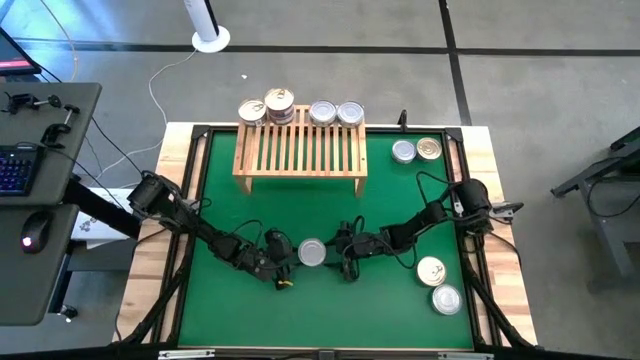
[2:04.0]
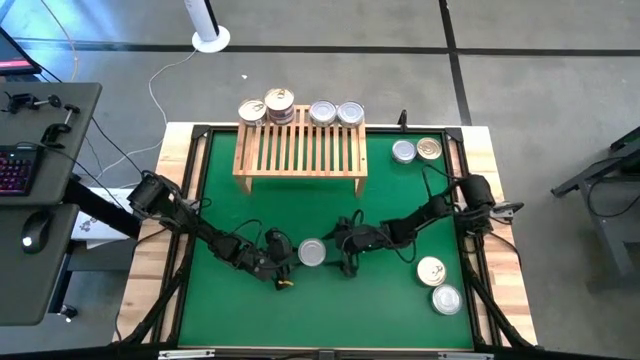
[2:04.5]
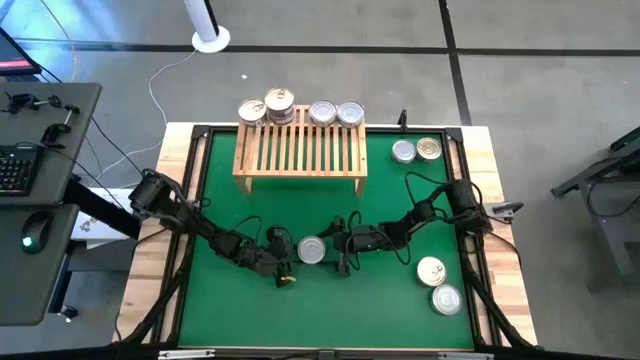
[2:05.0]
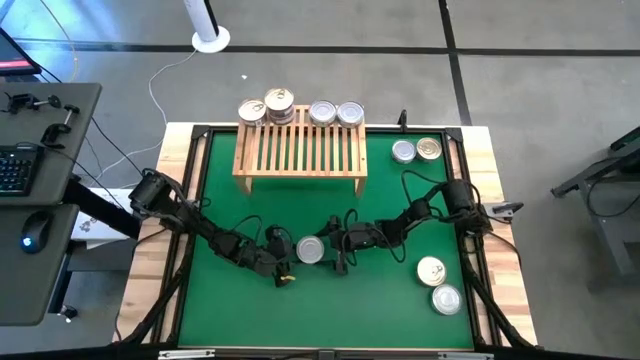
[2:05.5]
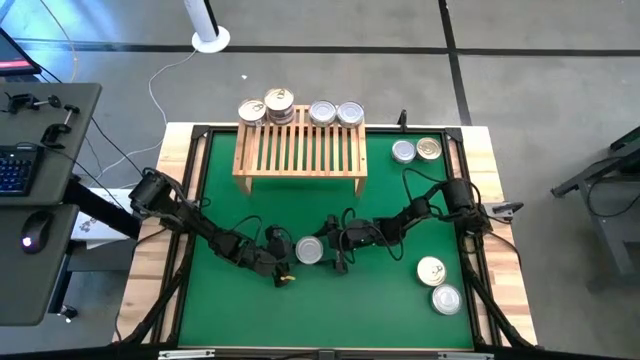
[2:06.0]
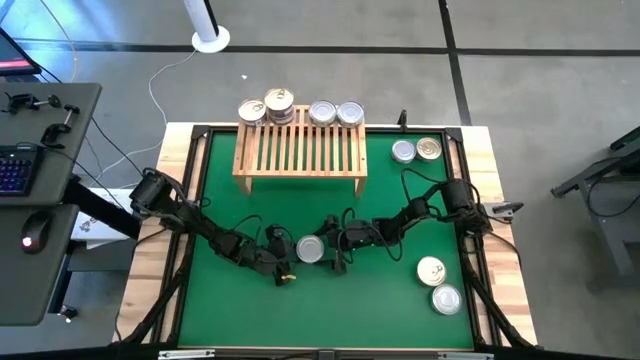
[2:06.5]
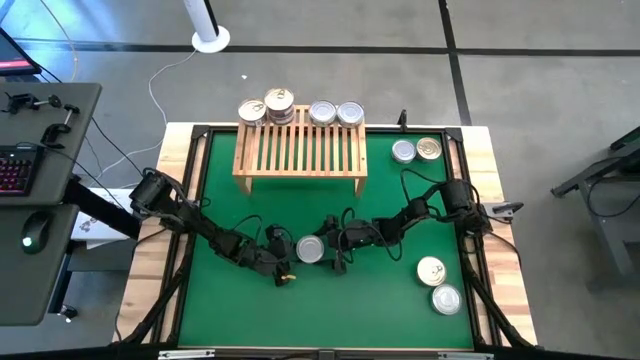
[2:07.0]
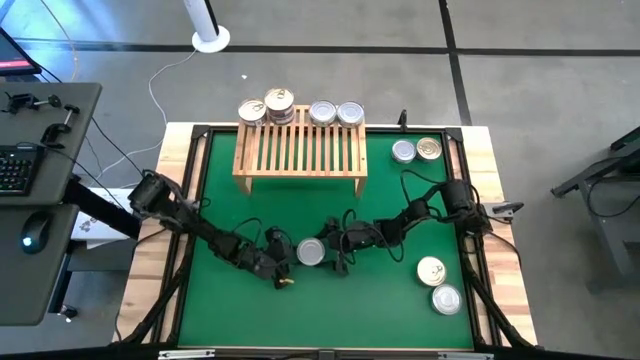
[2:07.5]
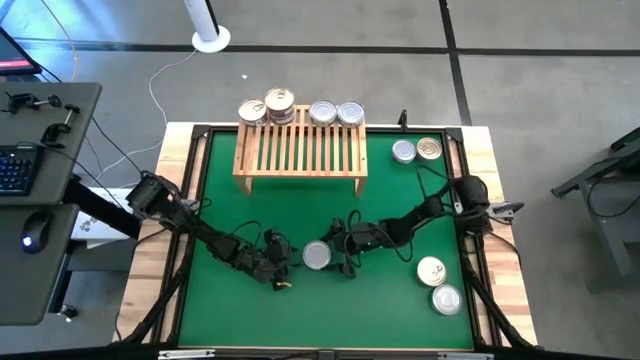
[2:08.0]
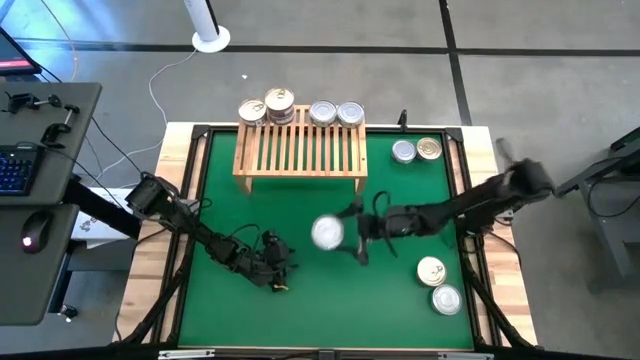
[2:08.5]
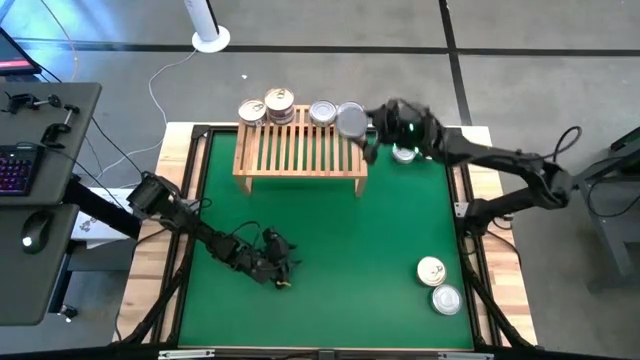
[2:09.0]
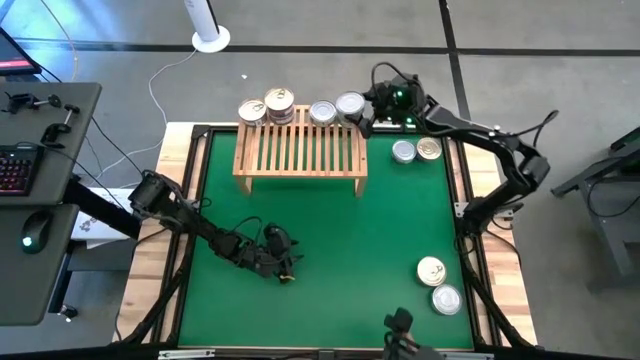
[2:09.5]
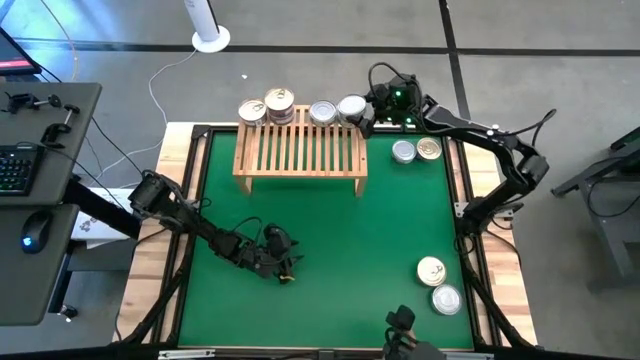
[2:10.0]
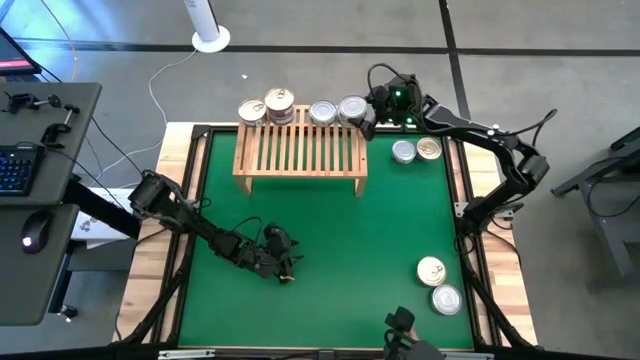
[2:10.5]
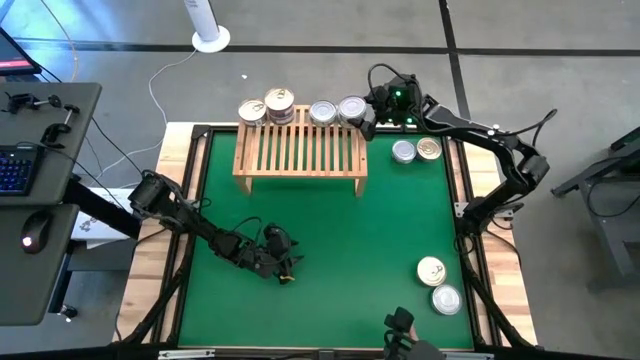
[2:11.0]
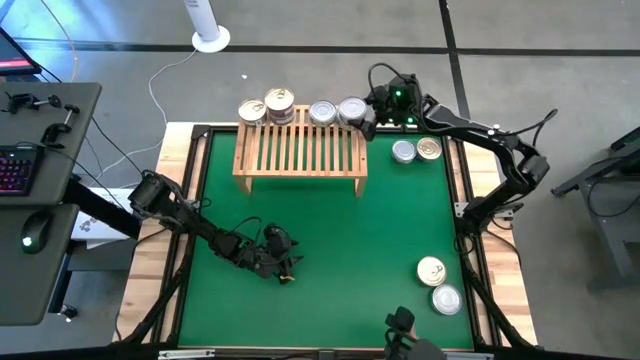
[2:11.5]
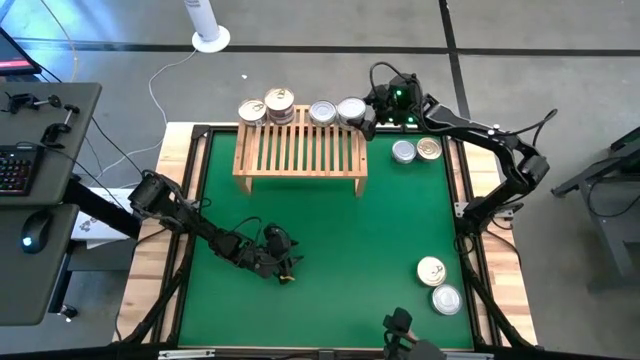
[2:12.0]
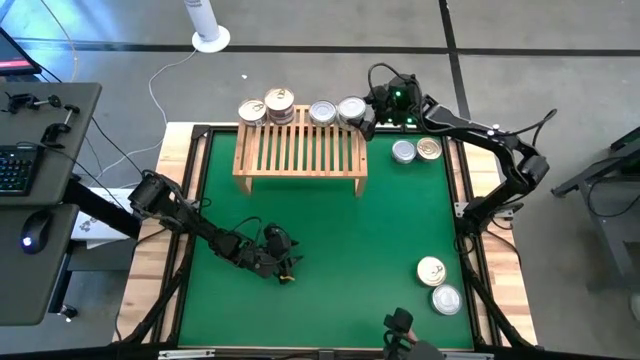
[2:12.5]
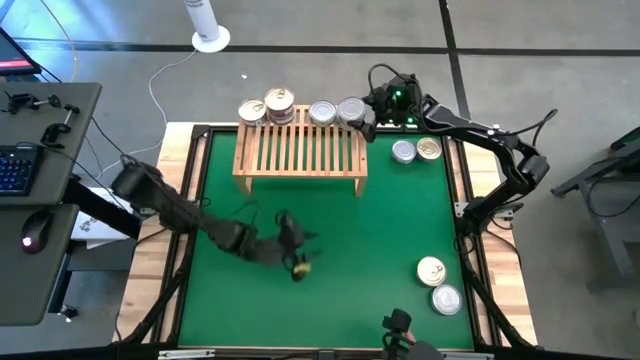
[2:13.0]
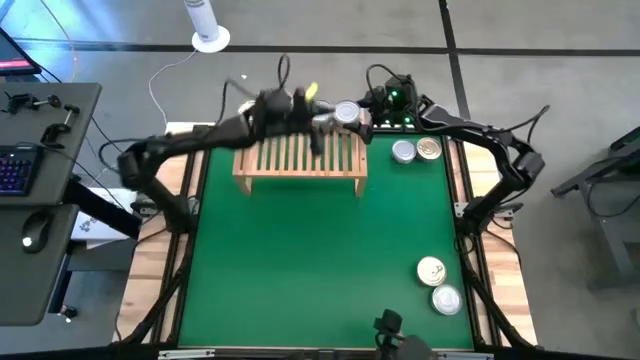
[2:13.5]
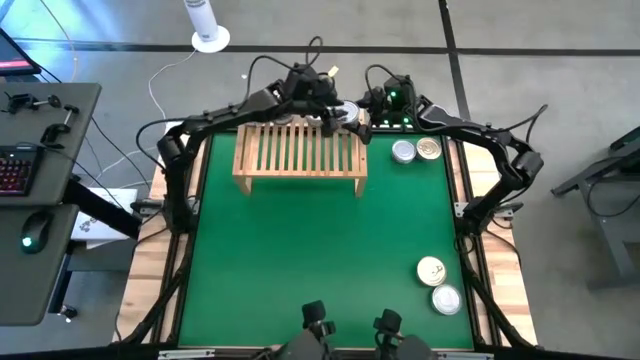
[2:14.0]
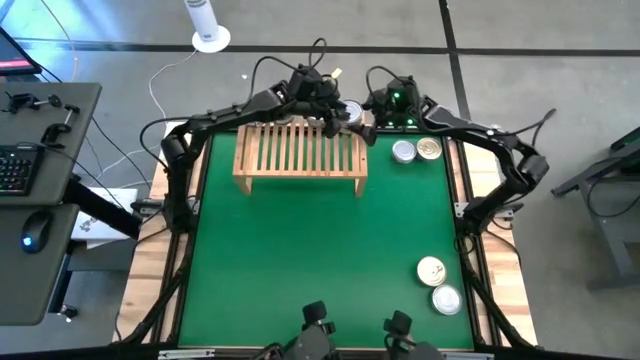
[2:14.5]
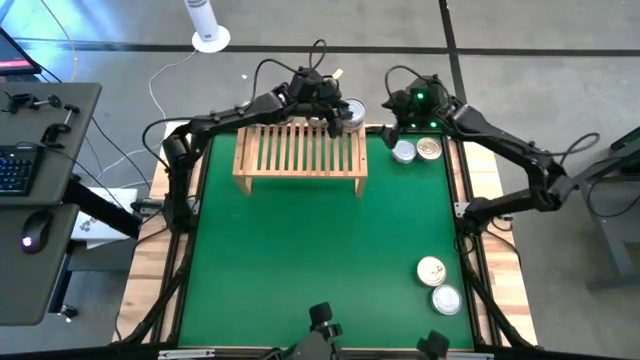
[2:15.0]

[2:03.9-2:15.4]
Task: Stack canned seafood by type on shelf
Stack the green white tuna can on top of the right green white tuna can on the shelf

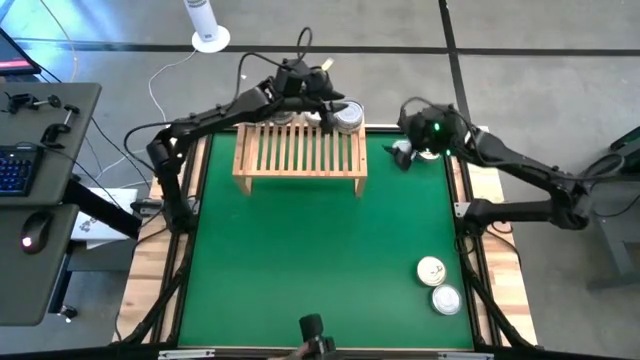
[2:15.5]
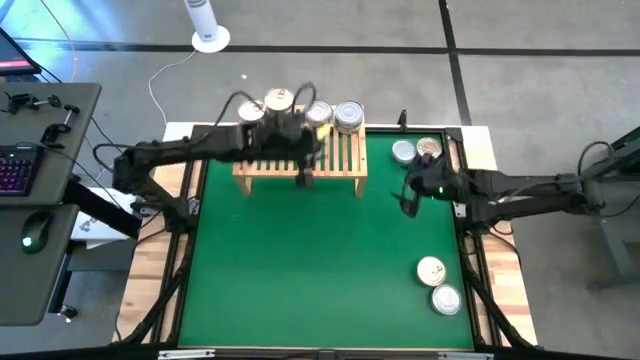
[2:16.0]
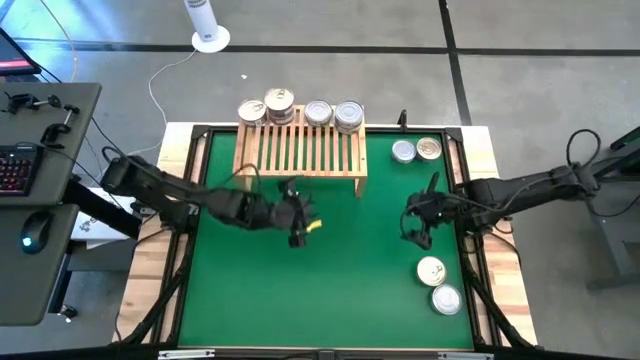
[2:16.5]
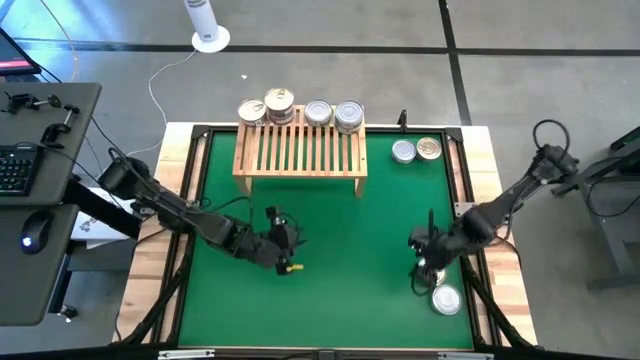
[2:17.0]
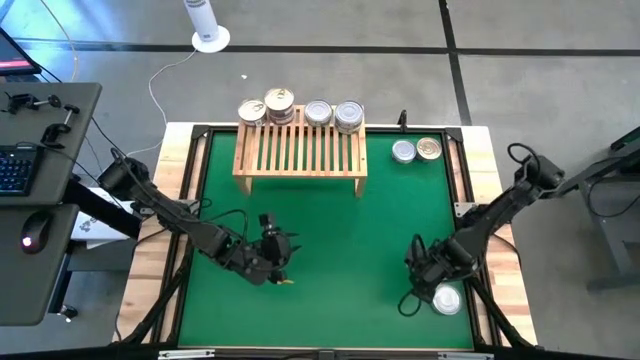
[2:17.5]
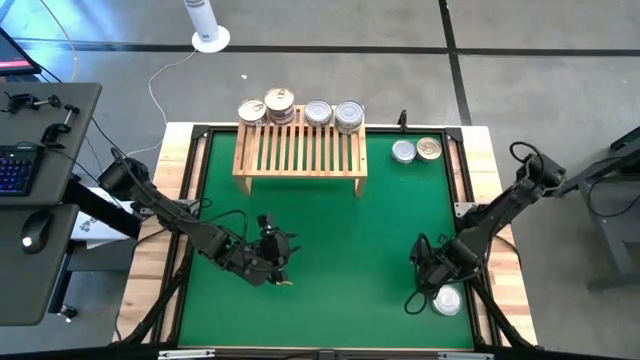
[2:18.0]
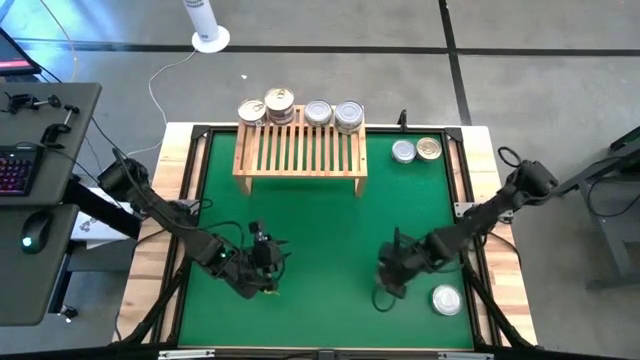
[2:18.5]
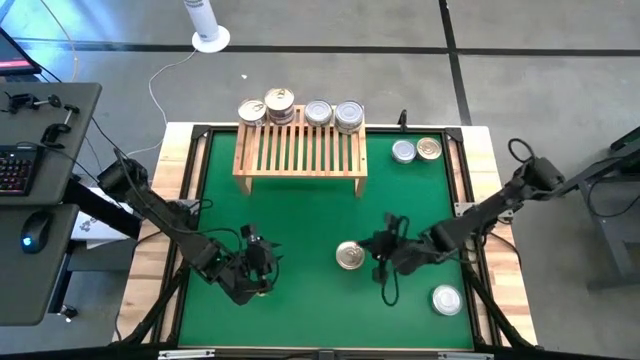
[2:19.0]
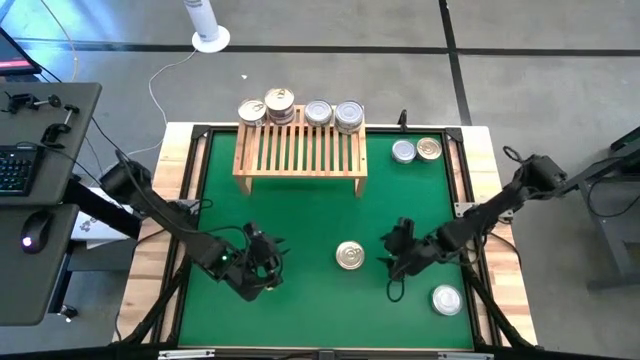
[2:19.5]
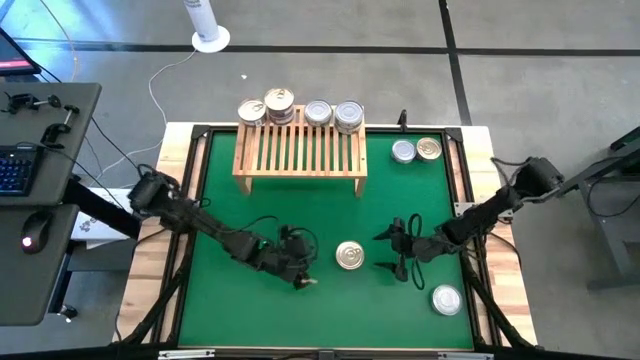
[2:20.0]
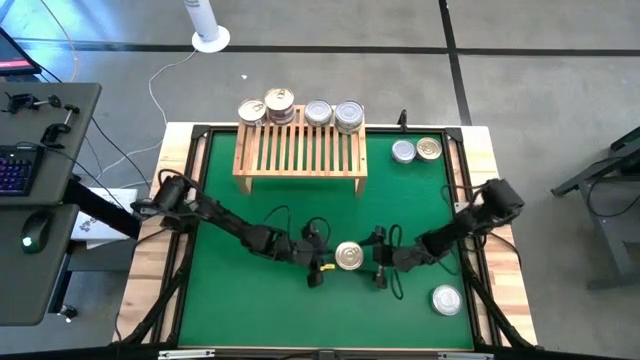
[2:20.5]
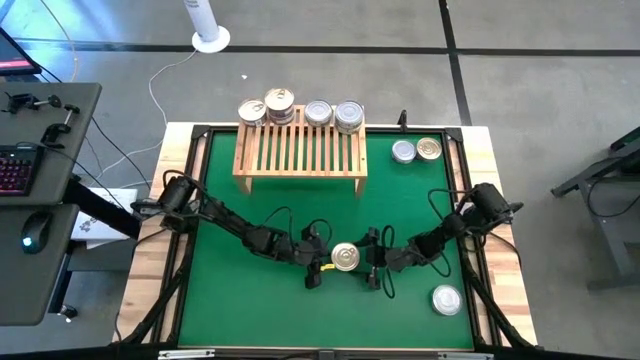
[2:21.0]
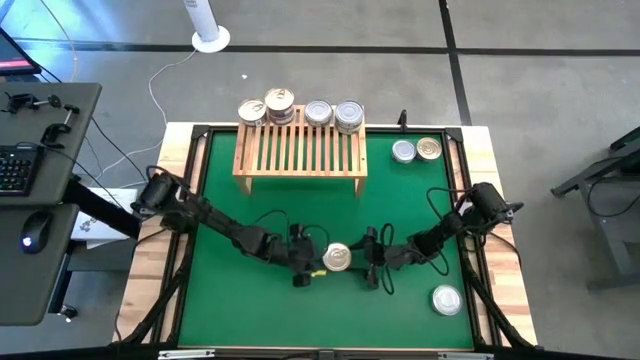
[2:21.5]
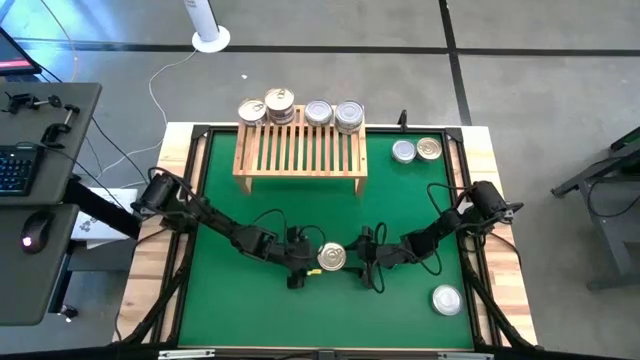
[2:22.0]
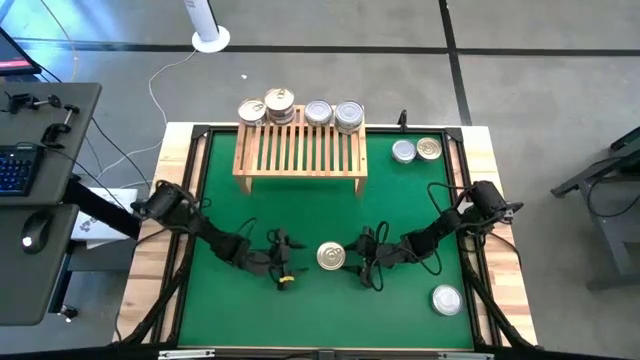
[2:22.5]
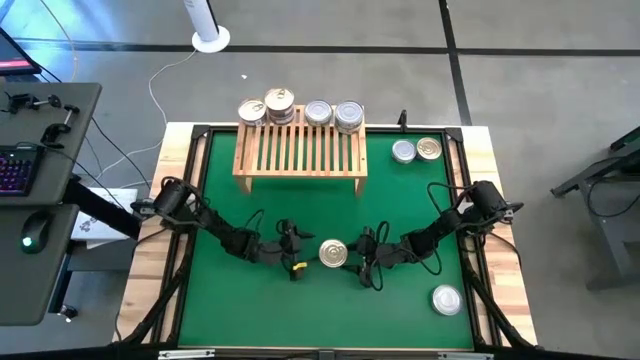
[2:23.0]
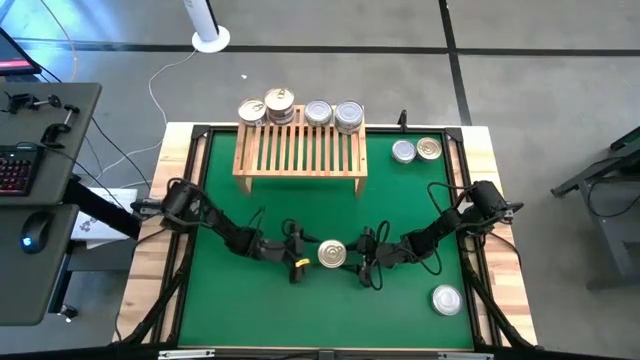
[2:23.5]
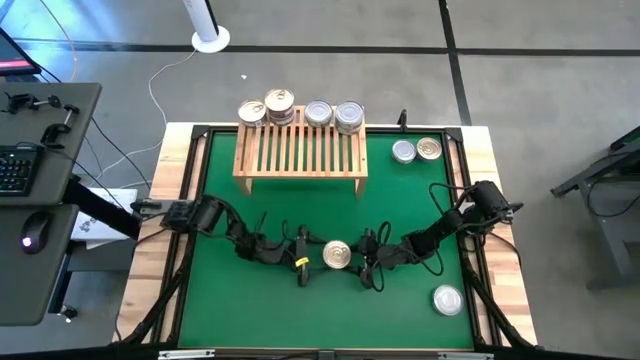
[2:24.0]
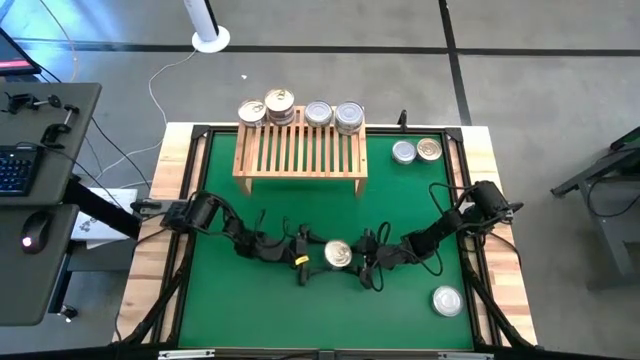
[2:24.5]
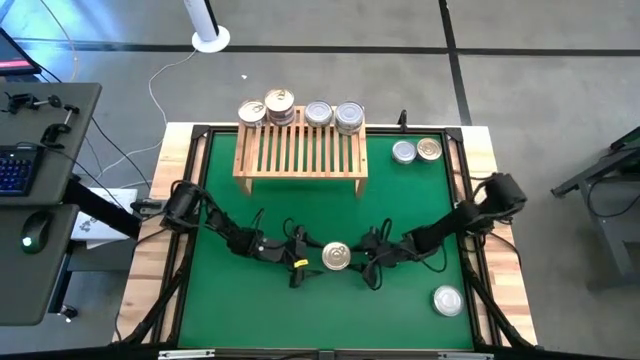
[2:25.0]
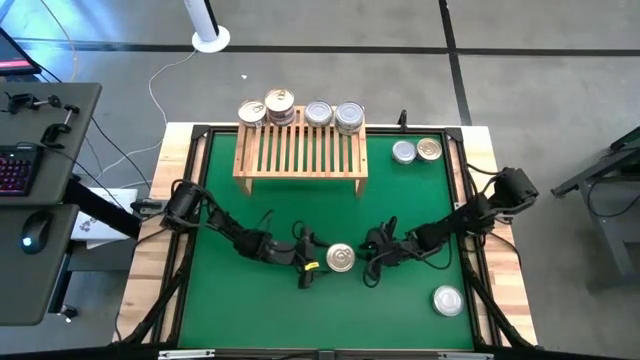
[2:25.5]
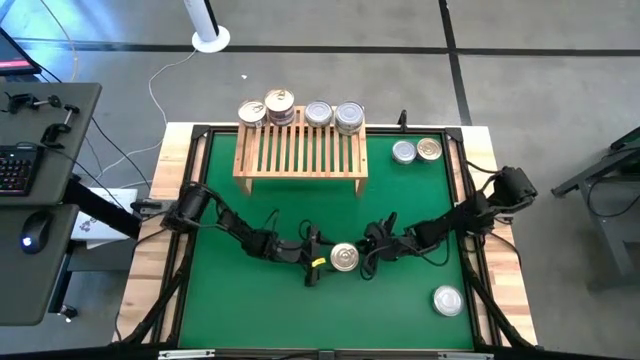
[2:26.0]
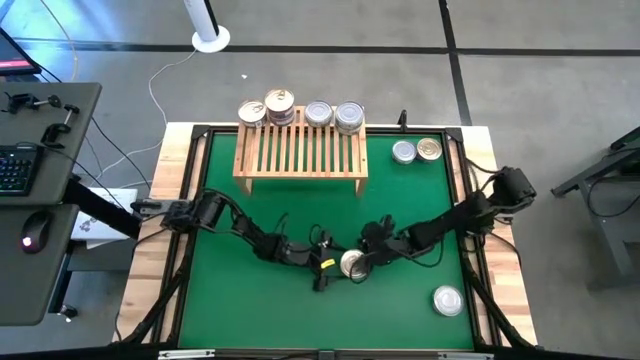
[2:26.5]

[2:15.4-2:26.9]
Stack the blue pink tuna can on top of the left blue pink tuna can on the shelf
